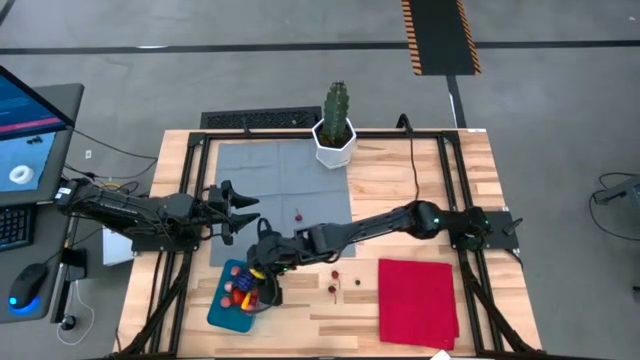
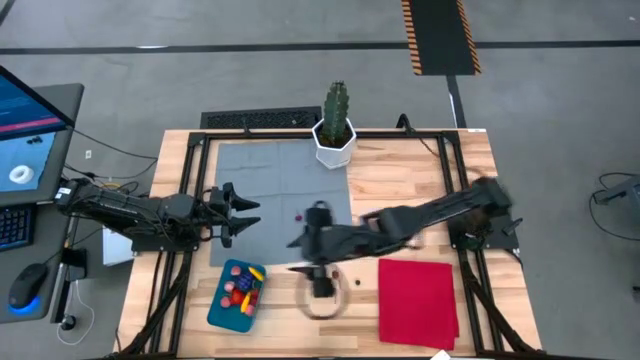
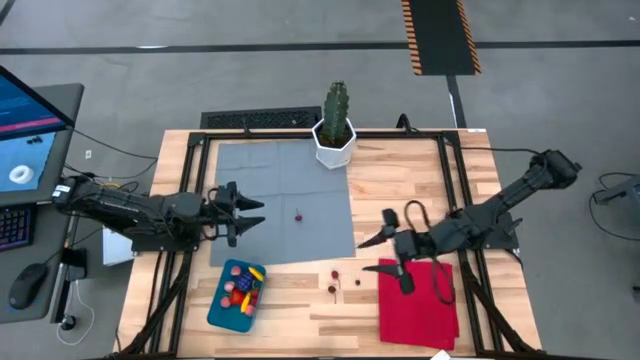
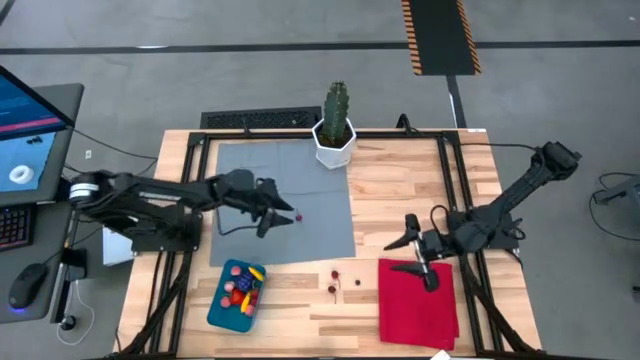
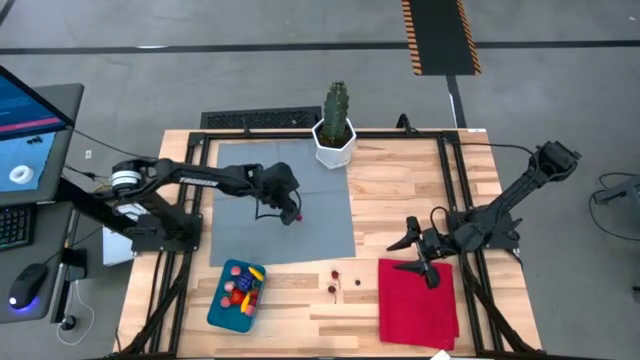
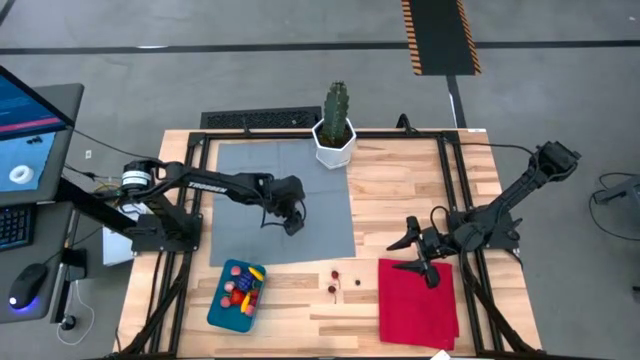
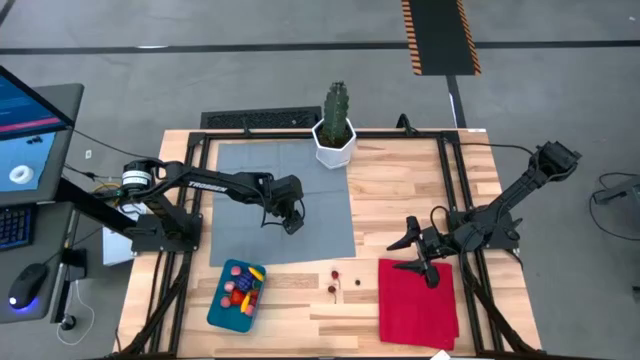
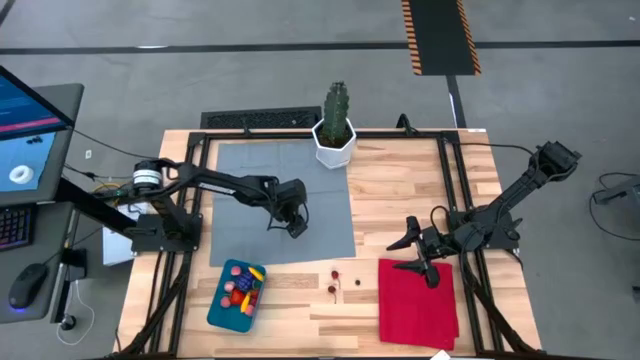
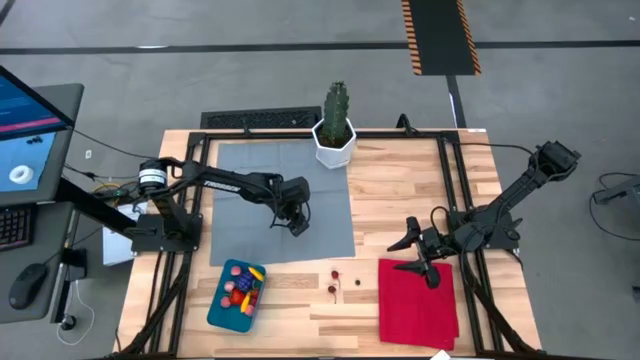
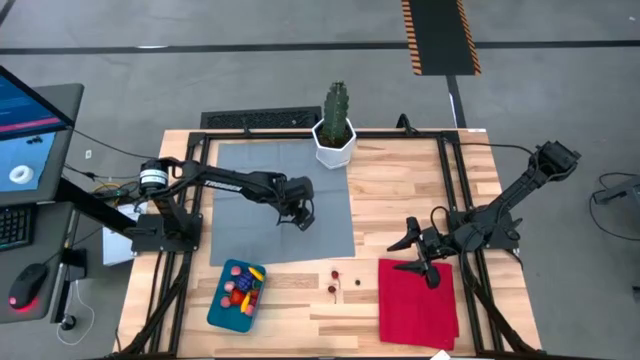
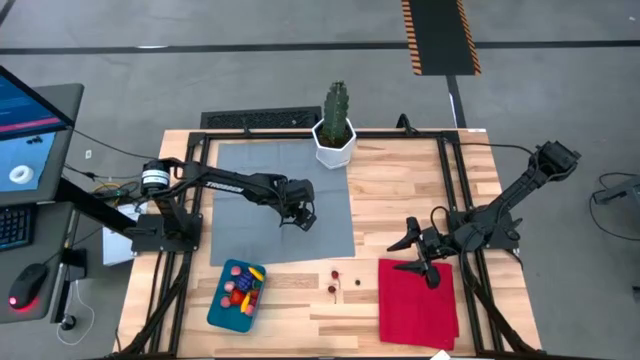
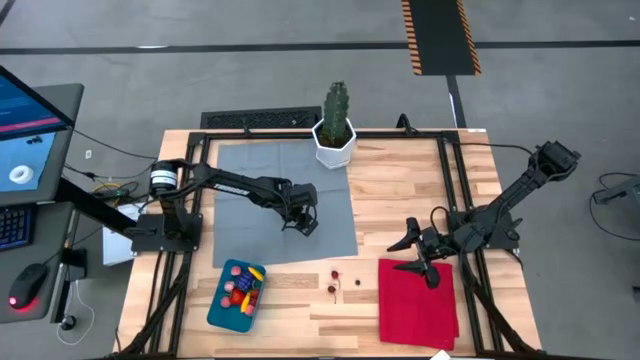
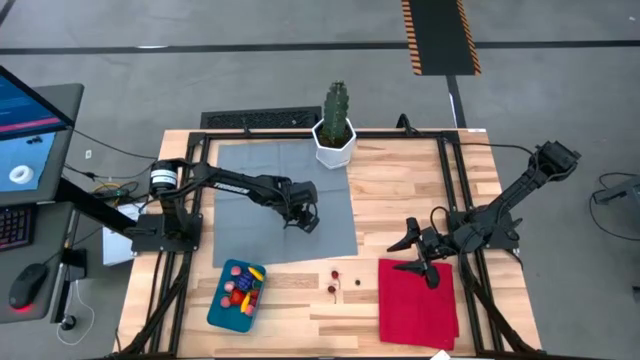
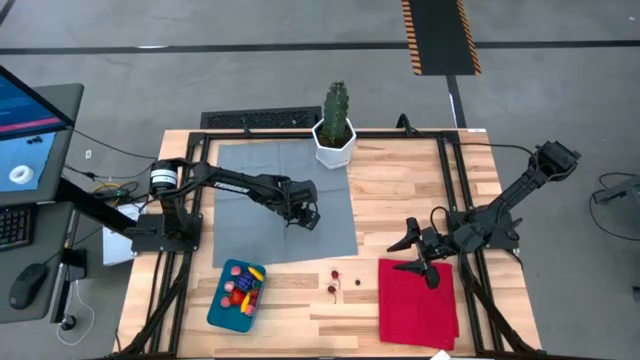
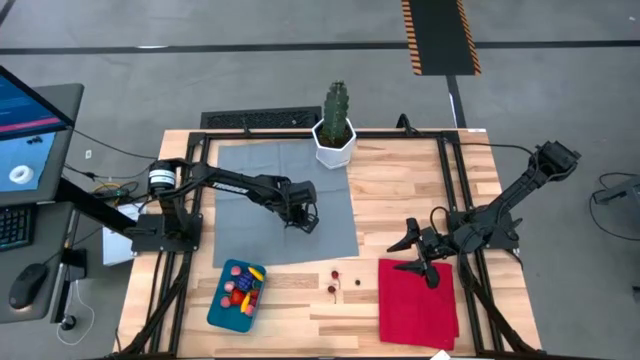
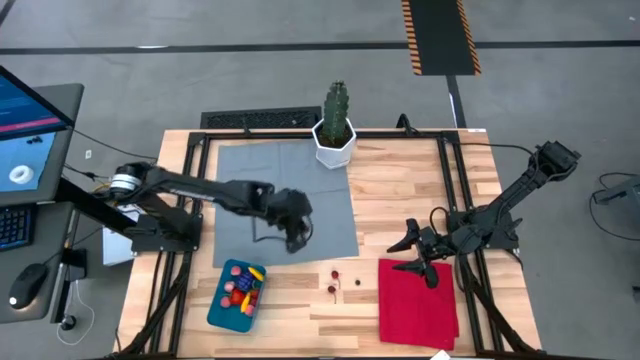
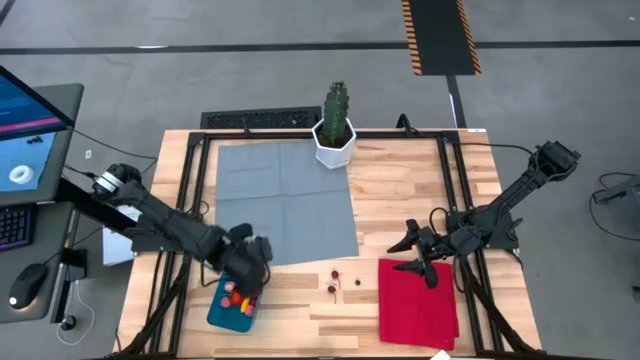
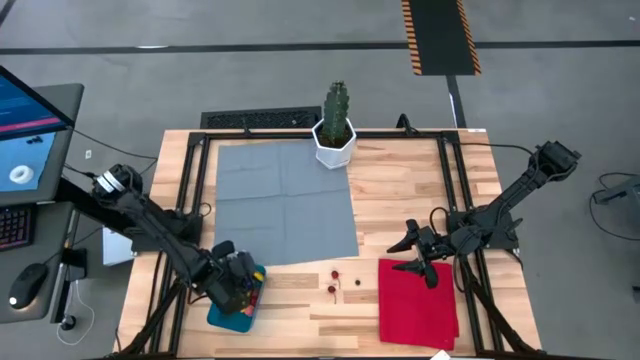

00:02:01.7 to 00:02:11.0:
Task: Pick and placing Produce into tupperware
Put the cherry into the blue bin

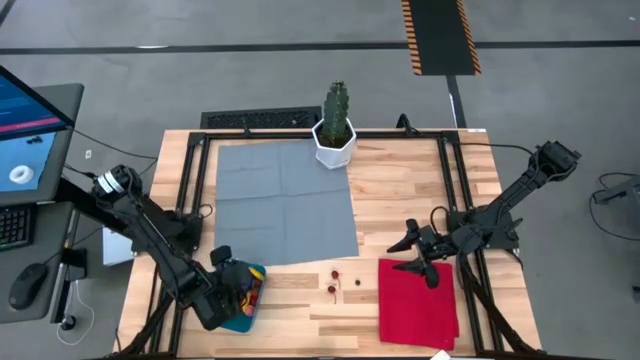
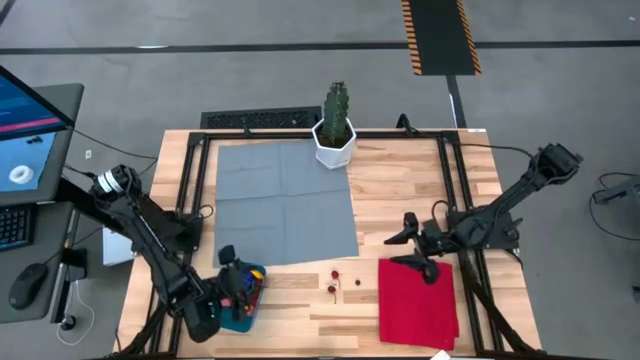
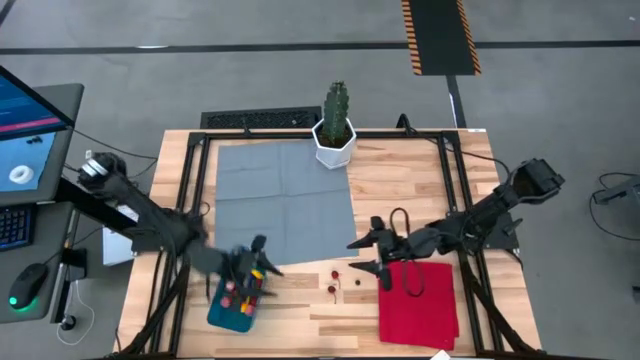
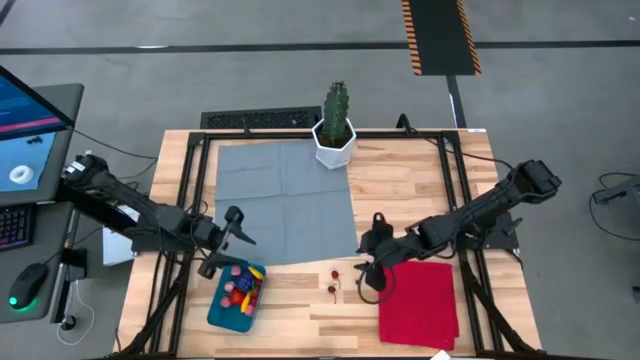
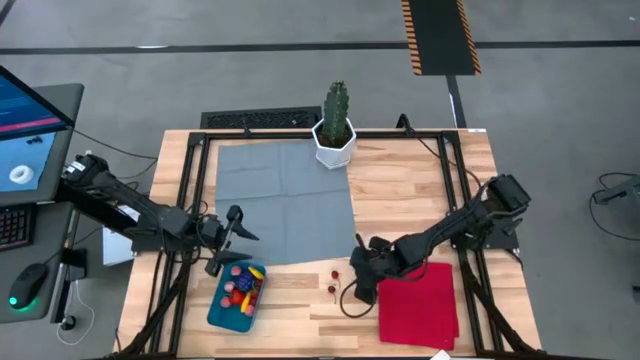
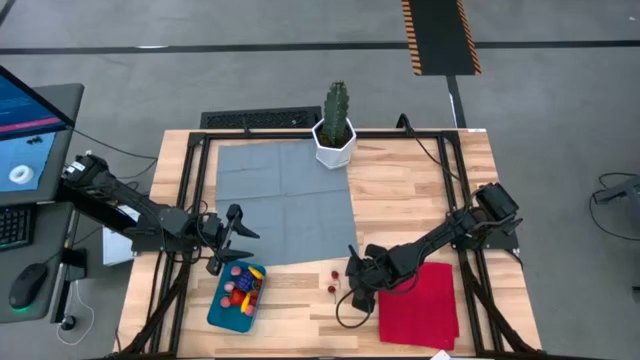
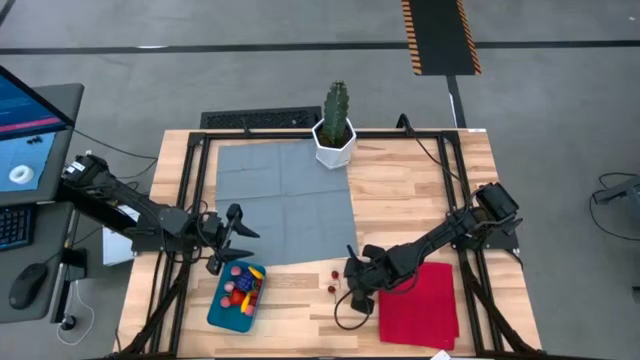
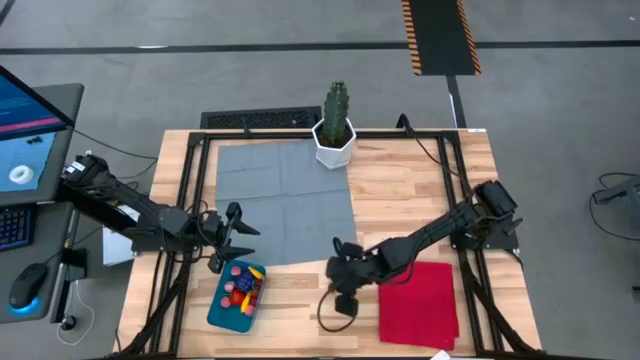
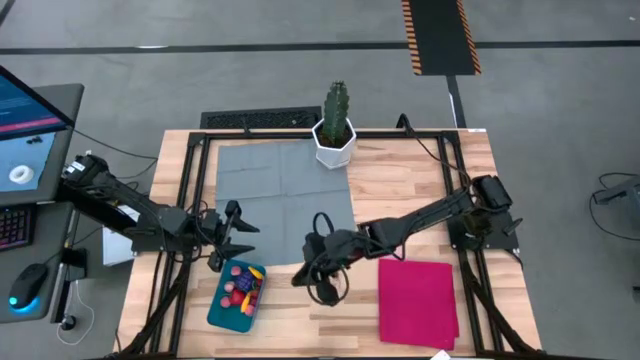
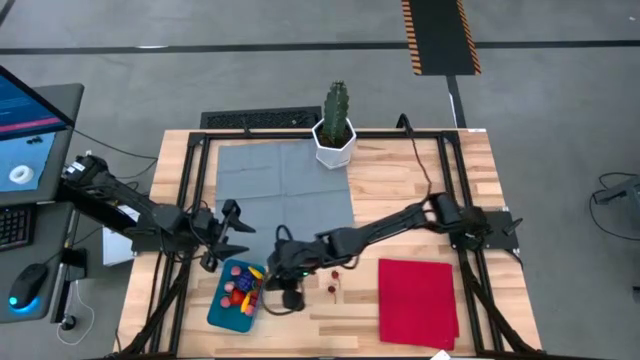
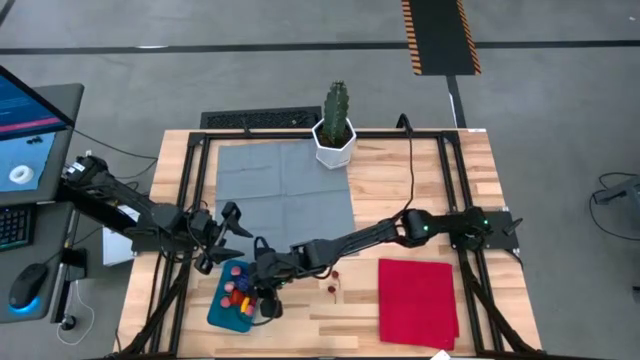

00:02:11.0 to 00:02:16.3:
Put the blueberry into the blue bin

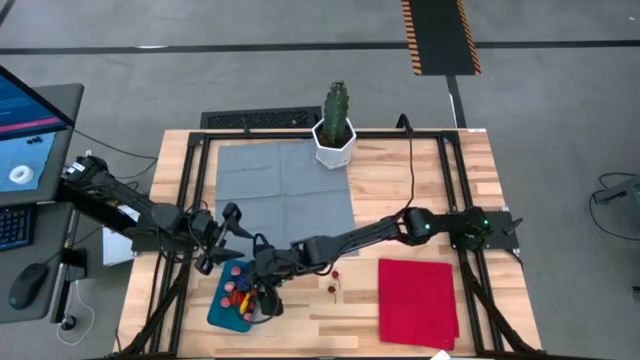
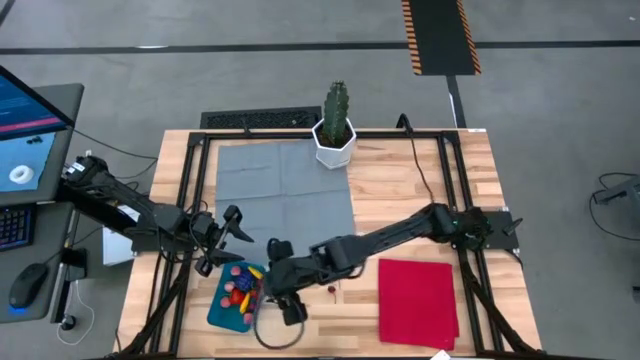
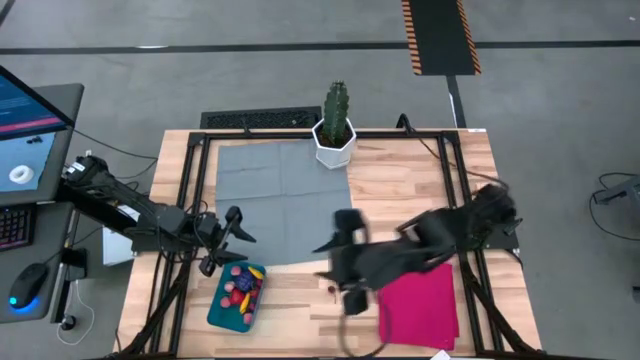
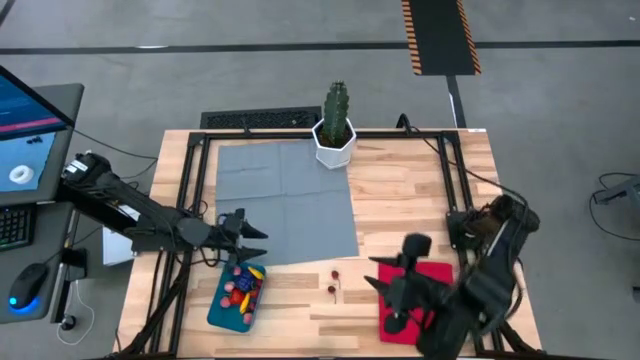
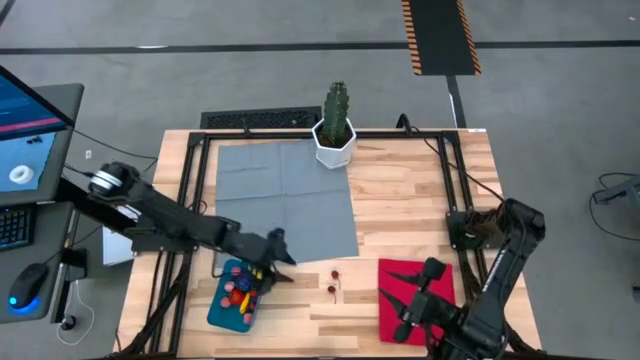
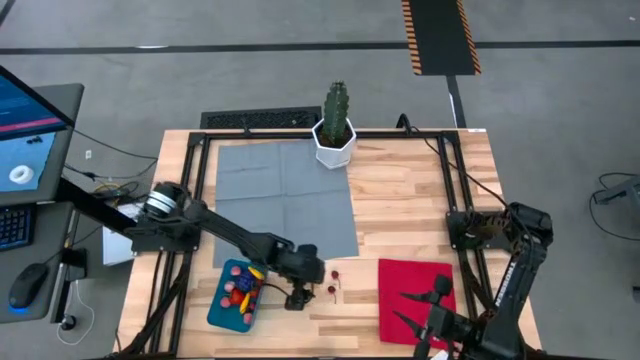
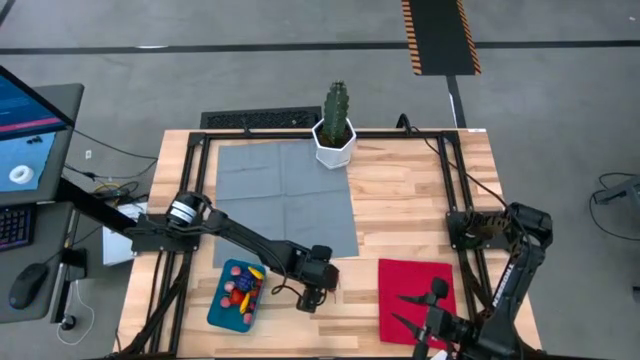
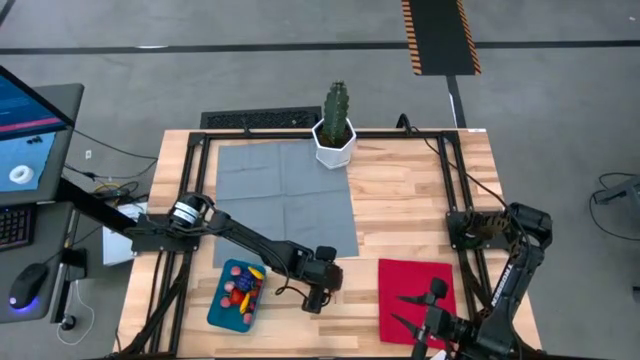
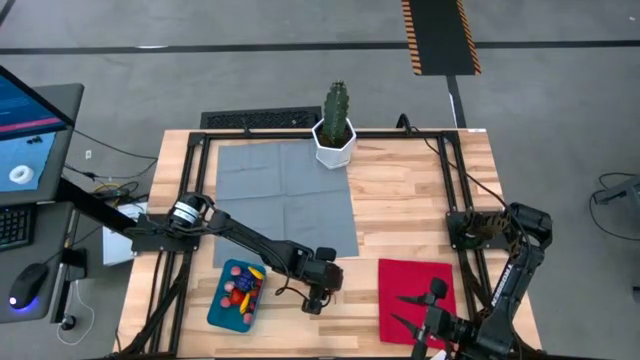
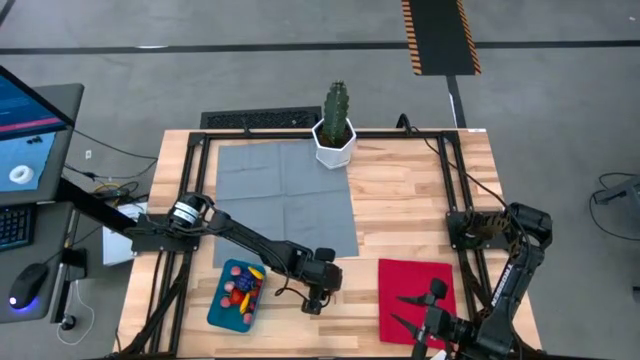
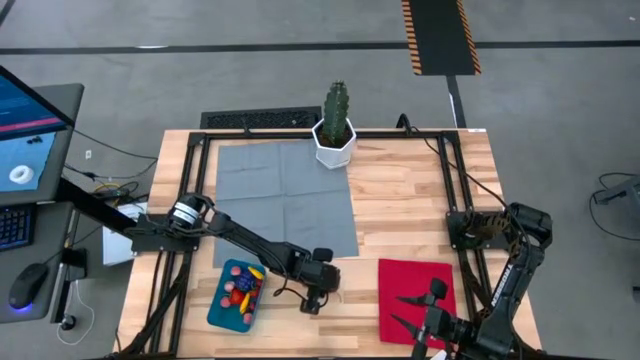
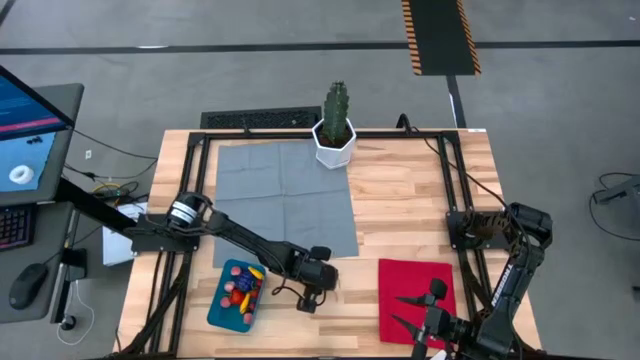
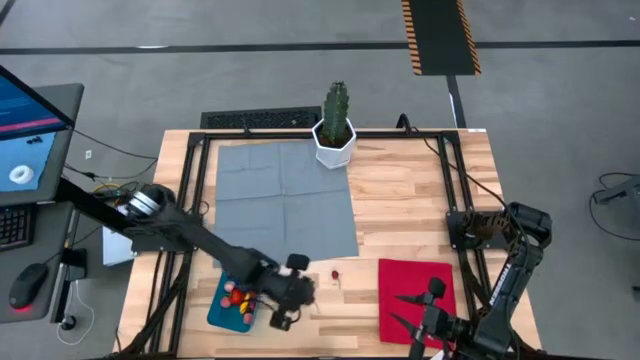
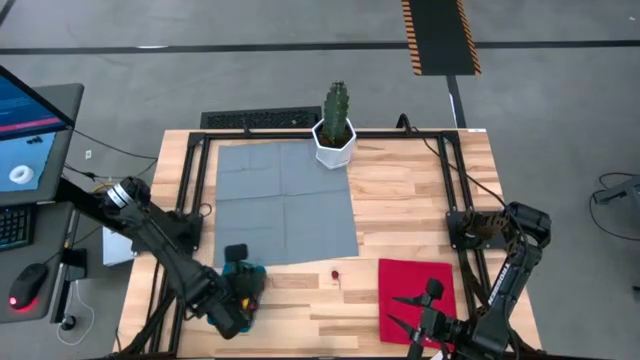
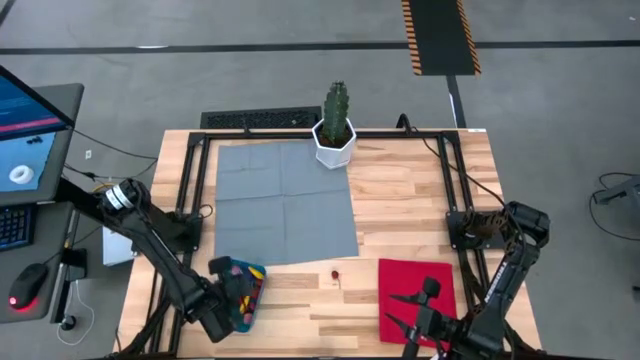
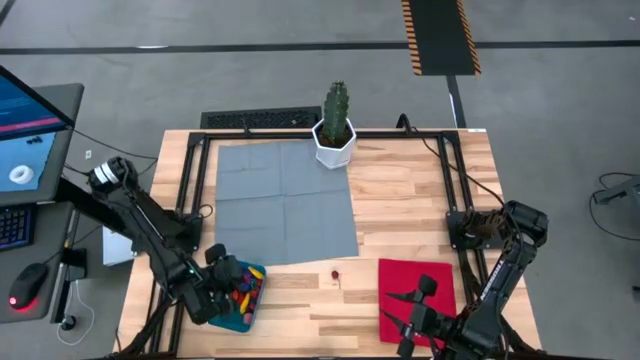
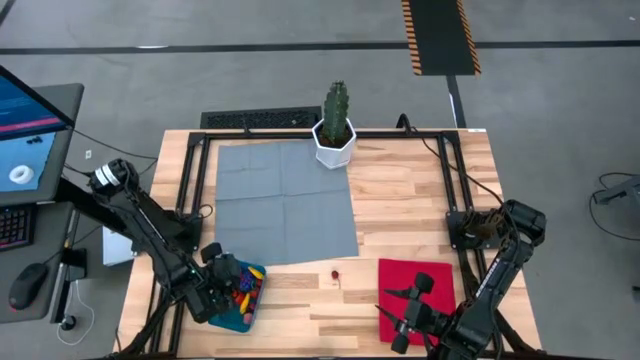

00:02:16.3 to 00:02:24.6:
Put the cherry into the blue bin
